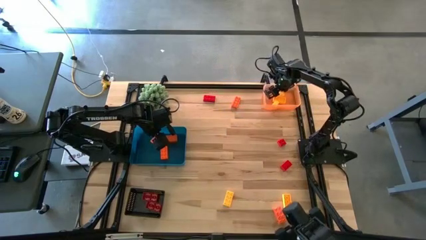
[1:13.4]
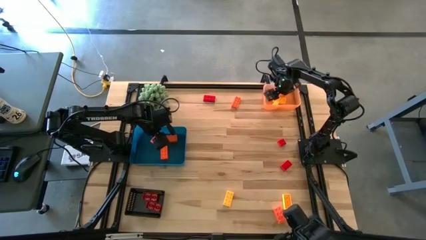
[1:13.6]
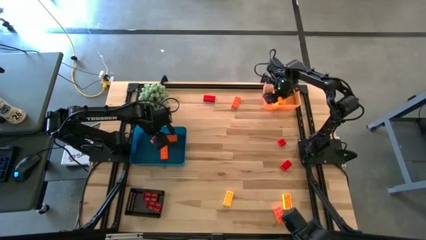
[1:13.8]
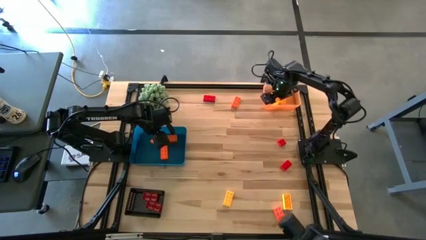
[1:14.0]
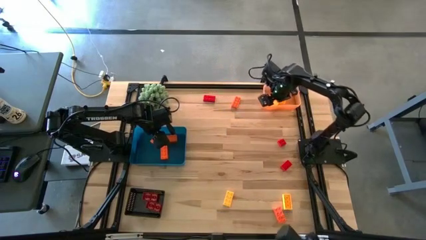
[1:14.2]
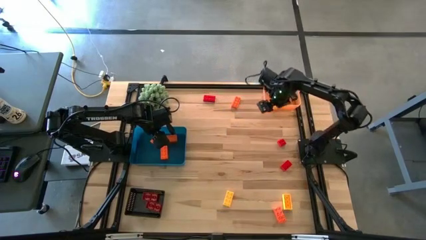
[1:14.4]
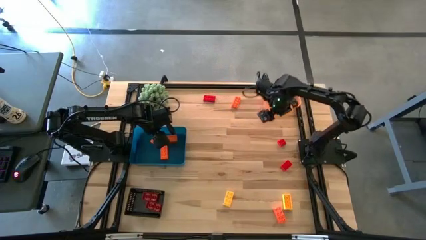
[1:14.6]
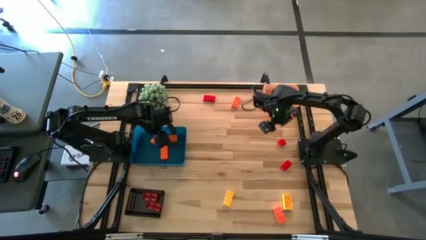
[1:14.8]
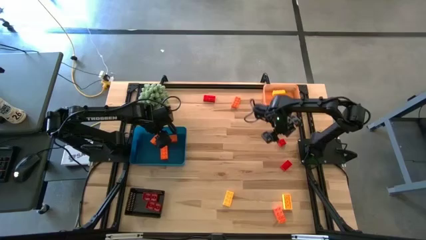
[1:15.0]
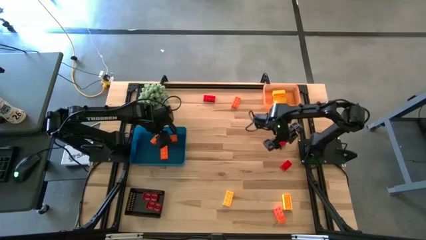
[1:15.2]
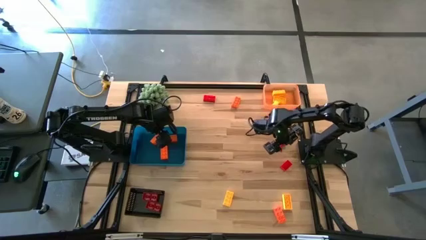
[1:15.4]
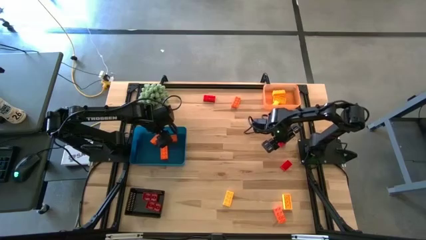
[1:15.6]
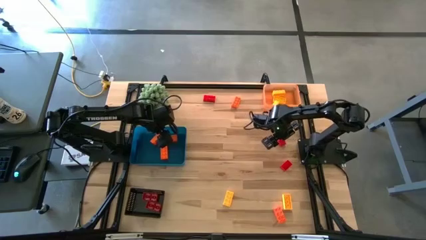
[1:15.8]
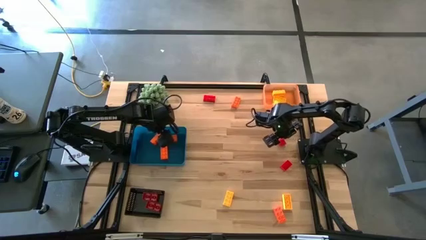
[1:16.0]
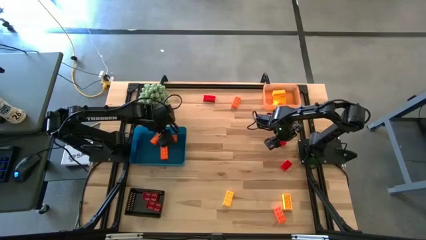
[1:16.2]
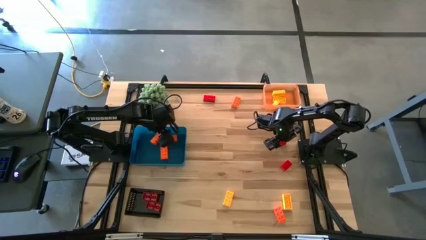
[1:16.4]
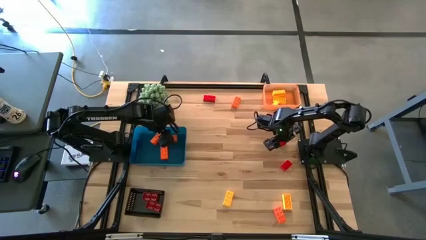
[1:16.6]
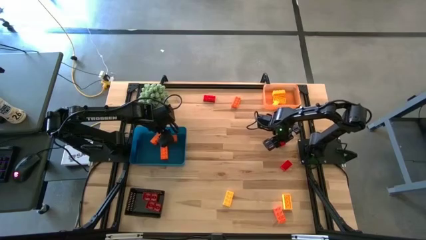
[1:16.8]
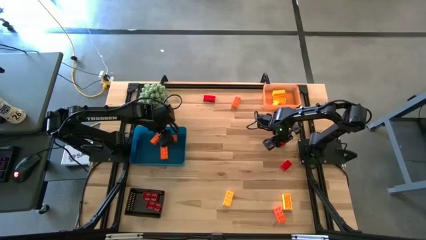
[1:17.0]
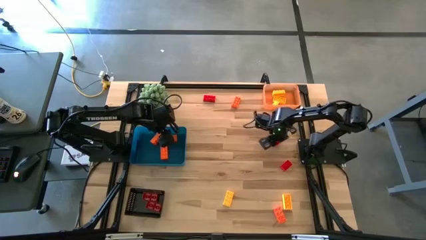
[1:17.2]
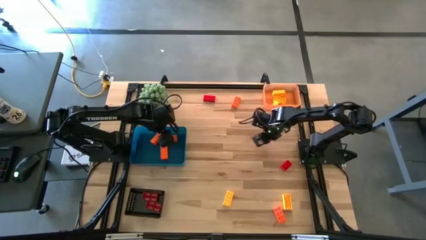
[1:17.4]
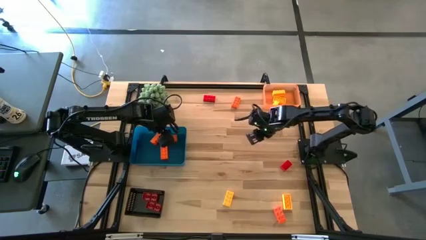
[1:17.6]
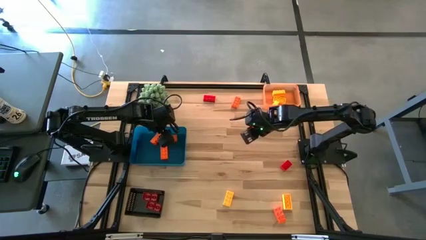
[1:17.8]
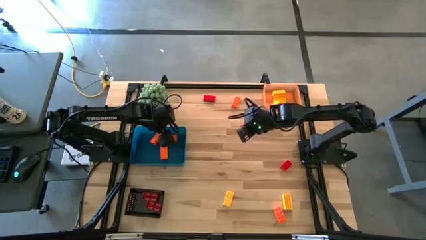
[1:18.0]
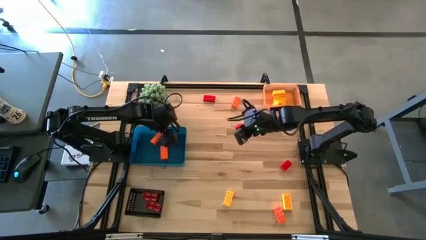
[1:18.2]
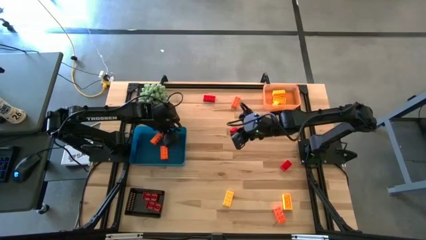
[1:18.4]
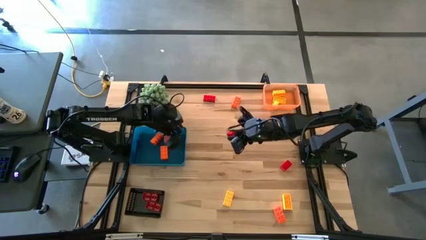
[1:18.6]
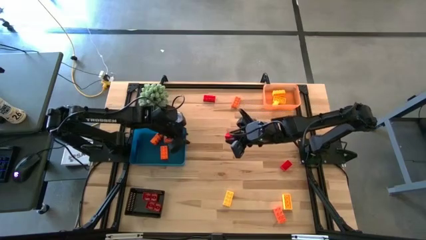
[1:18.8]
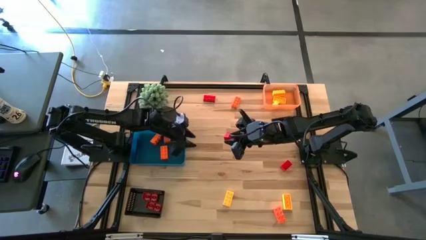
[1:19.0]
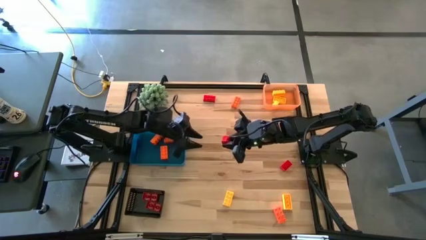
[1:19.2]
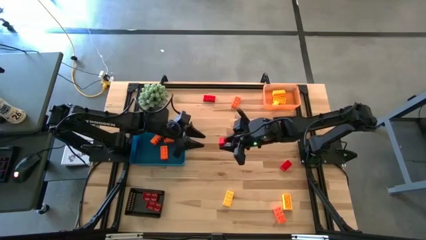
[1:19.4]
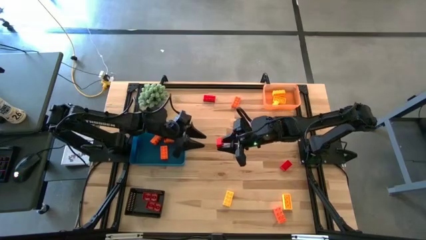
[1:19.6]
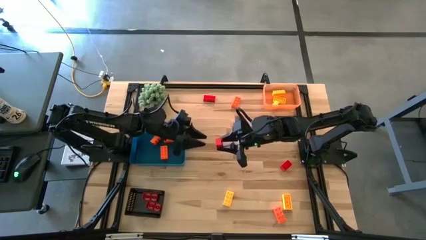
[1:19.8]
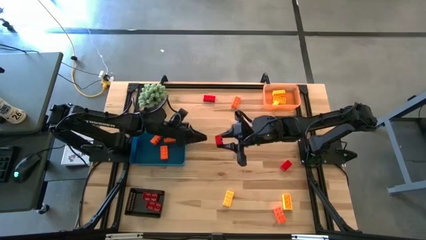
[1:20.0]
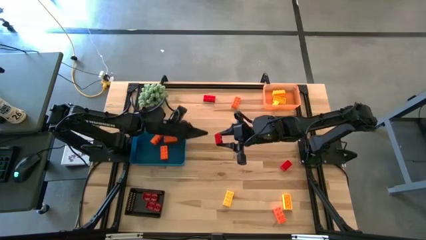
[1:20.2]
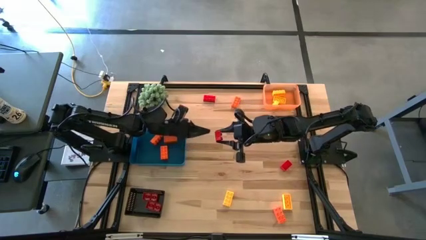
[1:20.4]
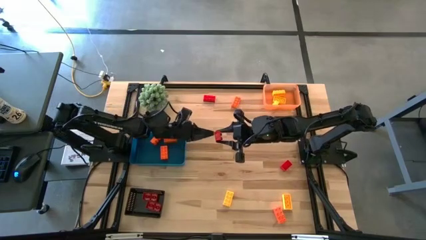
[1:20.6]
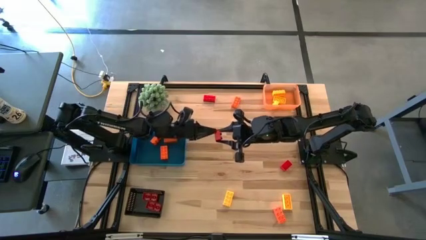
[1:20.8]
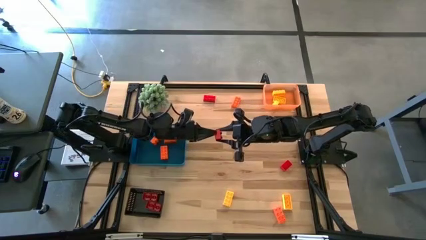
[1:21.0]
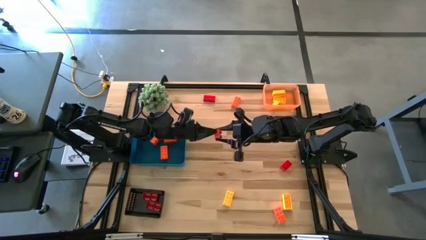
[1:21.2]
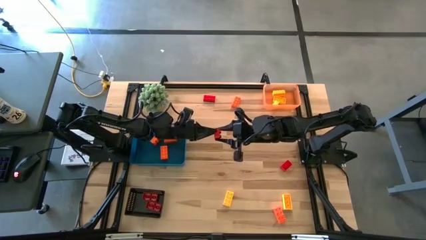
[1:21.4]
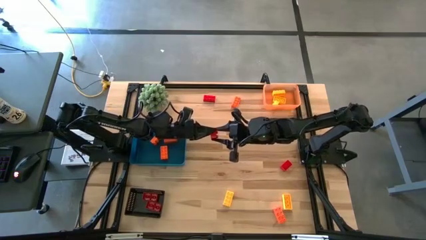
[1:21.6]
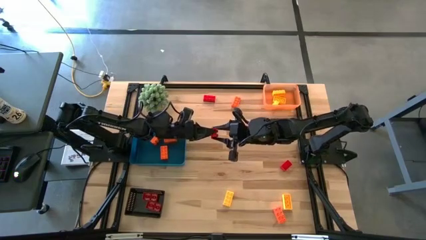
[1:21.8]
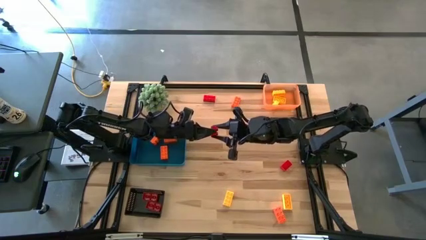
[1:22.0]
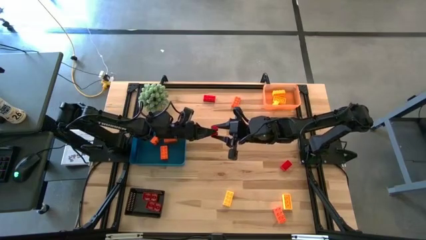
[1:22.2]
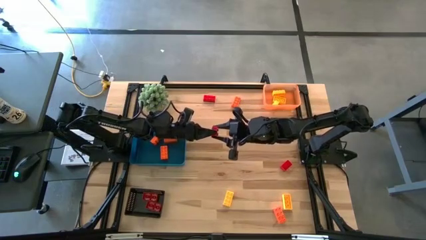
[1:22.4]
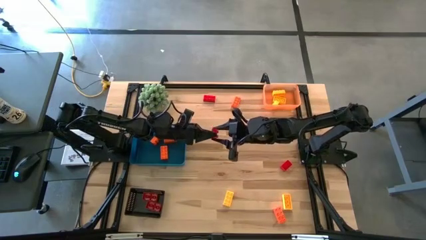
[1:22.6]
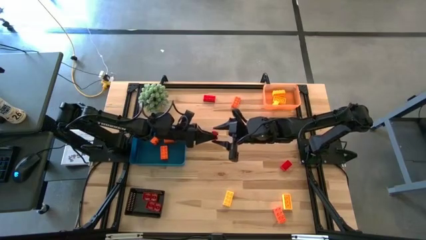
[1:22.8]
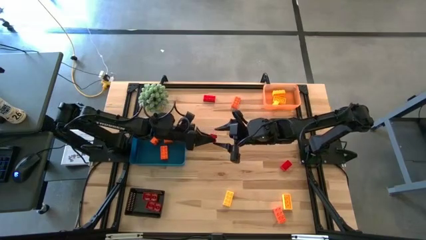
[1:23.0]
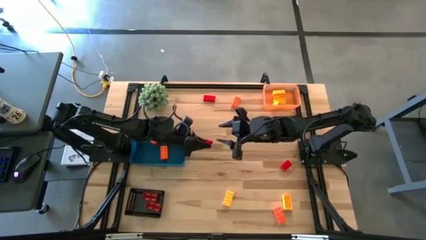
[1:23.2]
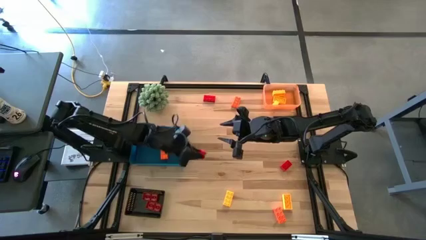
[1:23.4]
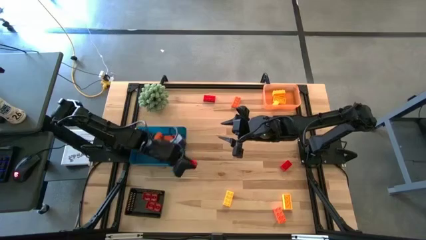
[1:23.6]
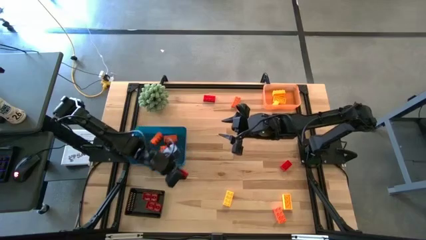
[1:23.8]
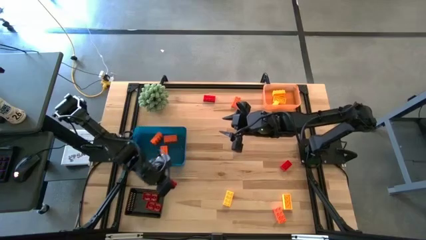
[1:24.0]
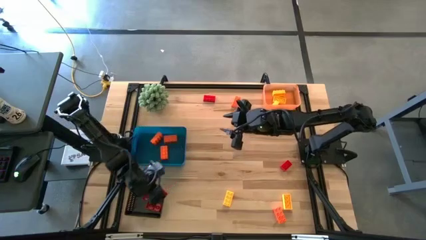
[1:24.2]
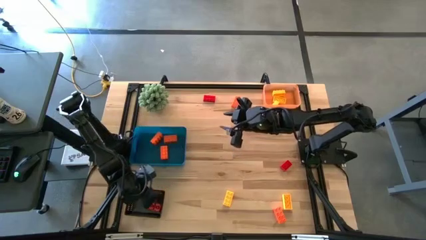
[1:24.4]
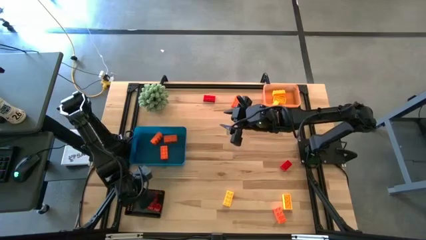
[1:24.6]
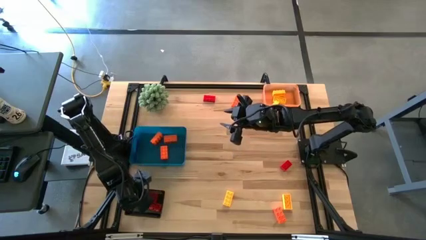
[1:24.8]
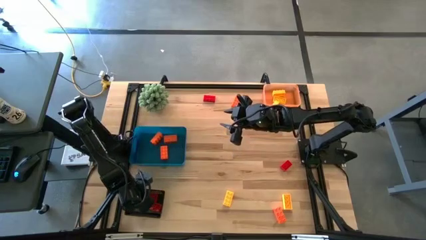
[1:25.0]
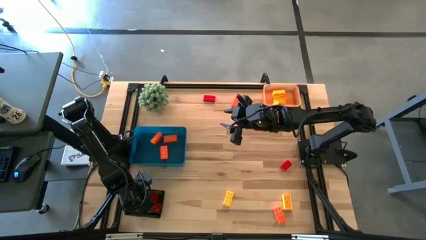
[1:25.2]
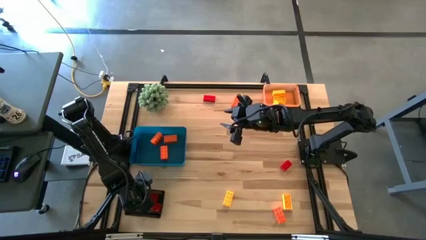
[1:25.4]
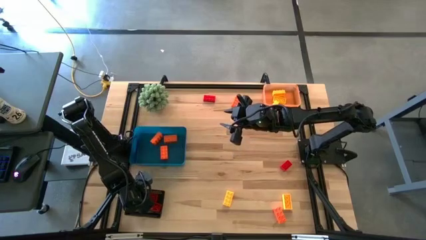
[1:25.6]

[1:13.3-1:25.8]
Task: Sort & place blocks by color
Put the red game piece into the black bin

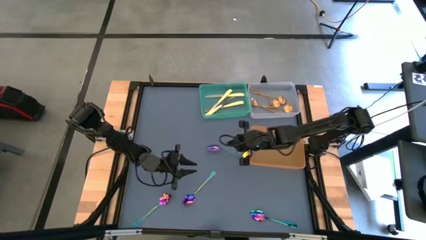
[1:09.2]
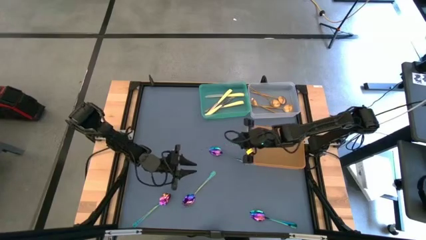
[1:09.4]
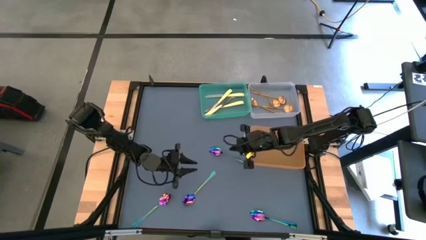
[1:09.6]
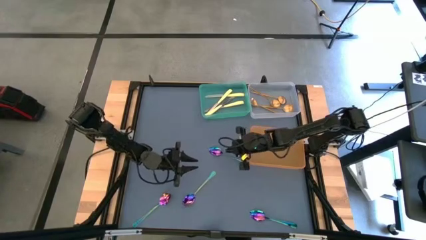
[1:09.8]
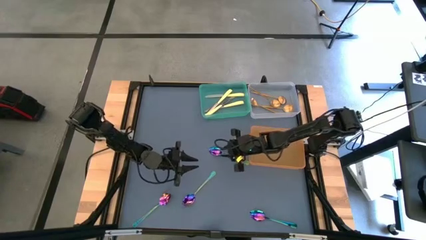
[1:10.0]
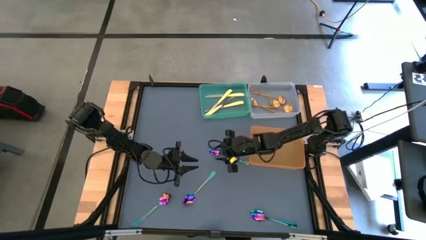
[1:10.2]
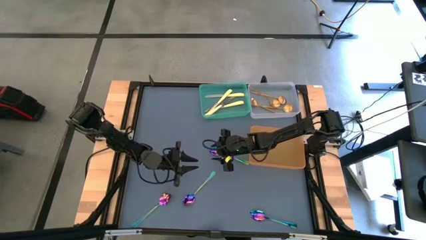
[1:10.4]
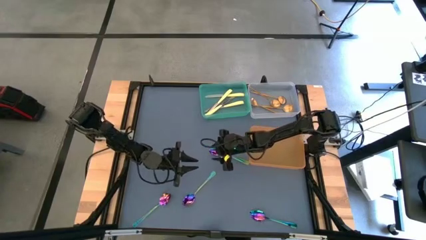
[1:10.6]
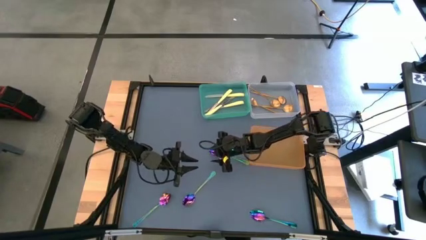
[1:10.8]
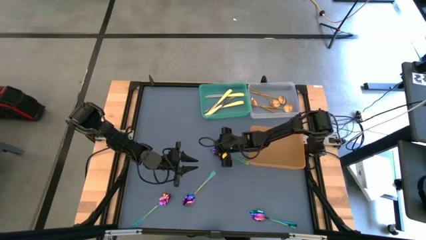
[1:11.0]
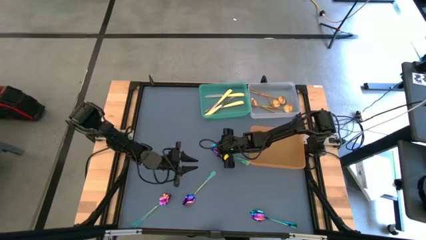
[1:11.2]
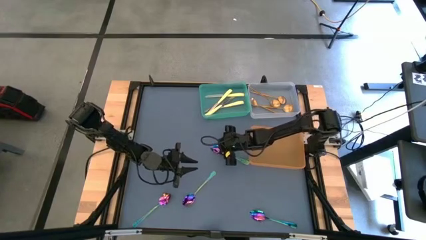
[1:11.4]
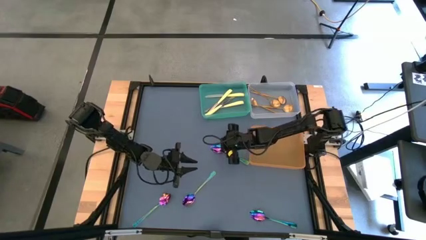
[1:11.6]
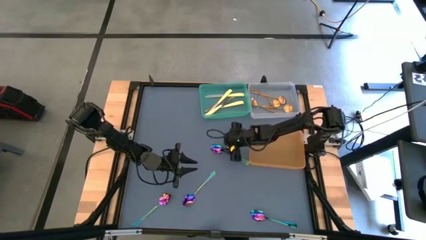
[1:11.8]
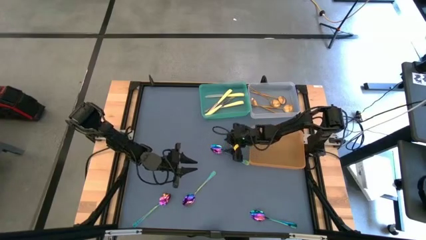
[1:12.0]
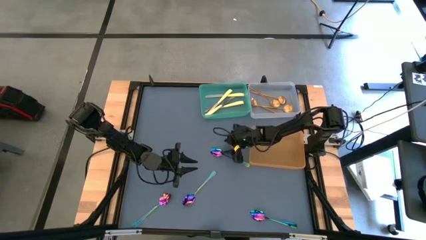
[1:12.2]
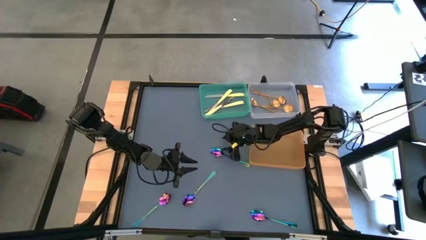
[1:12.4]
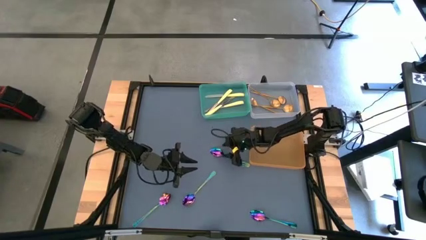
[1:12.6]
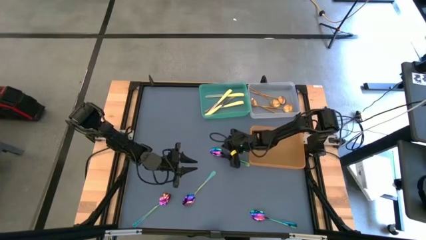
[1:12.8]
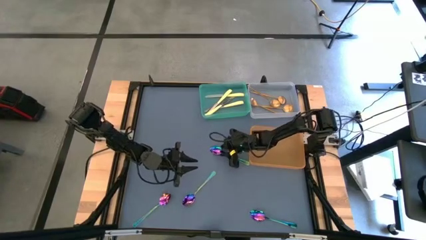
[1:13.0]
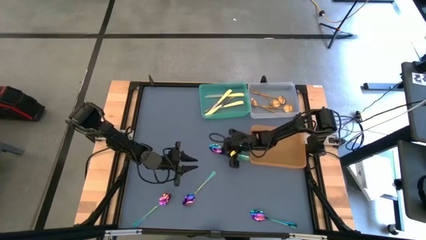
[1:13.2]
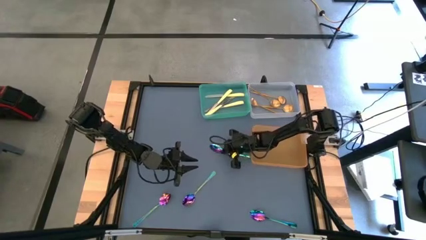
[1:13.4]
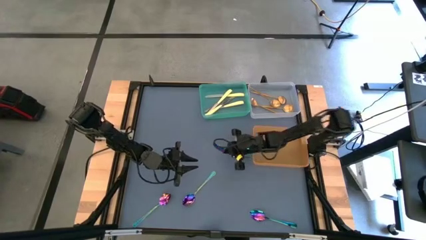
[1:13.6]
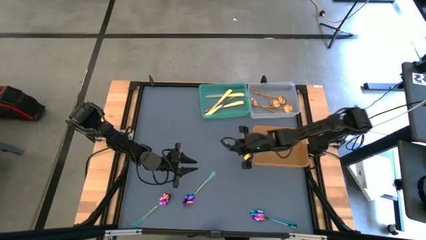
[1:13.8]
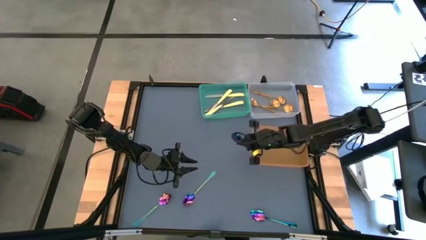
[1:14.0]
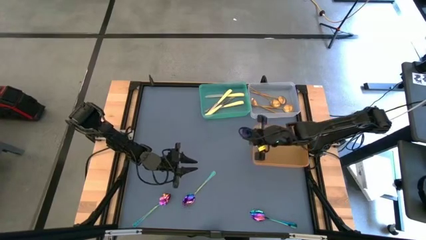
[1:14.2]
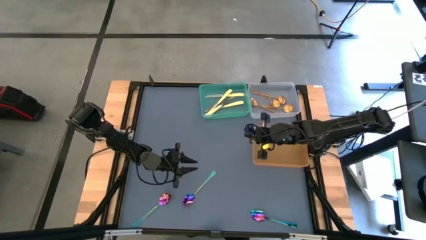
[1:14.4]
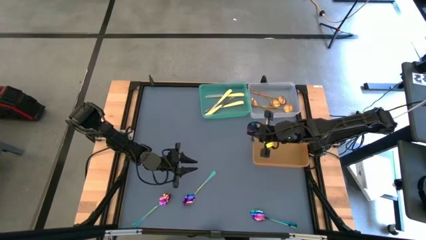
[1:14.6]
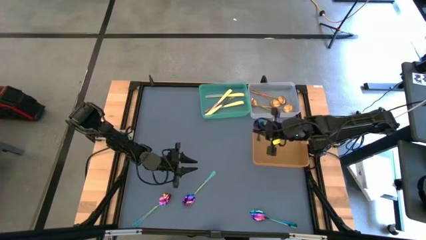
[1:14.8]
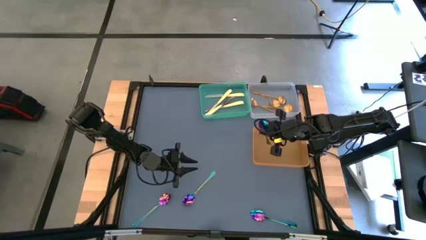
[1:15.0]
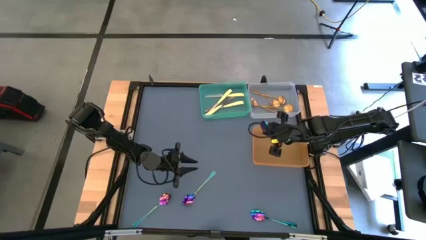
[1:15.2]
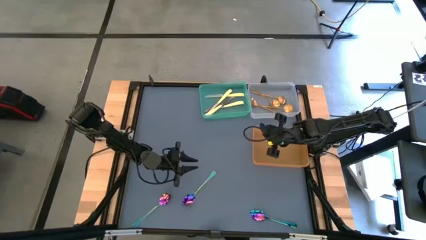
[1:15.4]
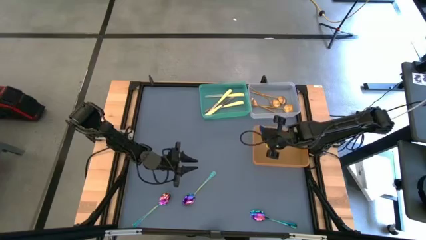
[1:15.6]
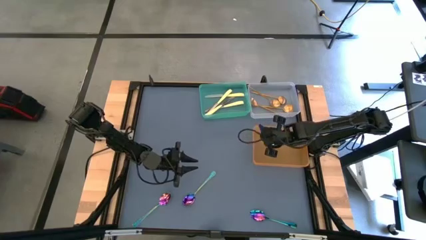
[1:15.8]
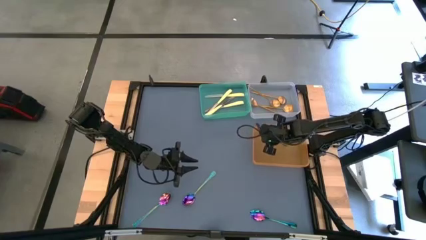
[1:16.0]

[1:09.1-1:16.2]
Task: Sort silverware by color (type)
Put the iridescent spoon into the orange bin
